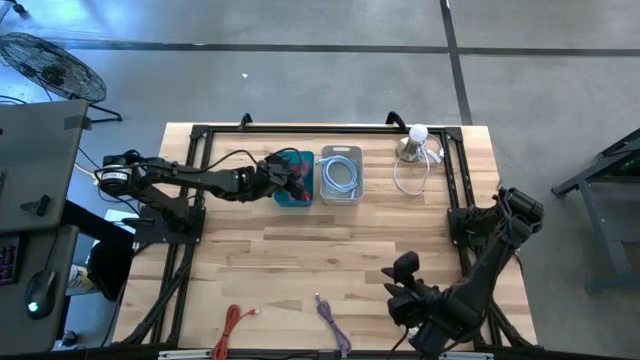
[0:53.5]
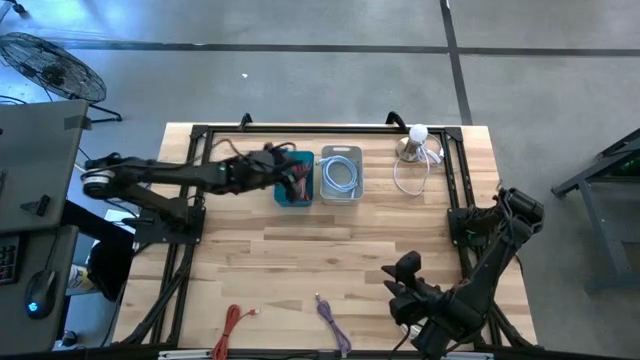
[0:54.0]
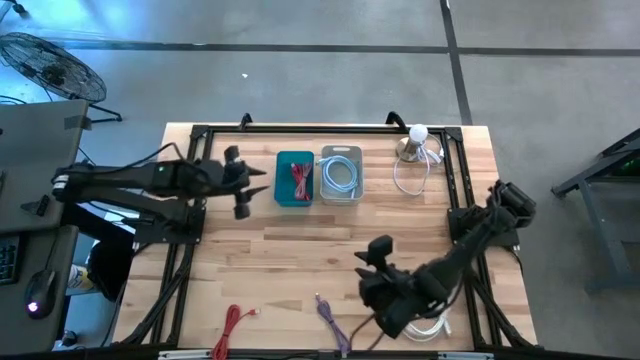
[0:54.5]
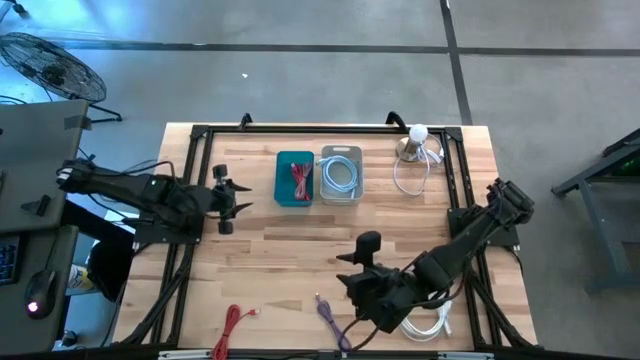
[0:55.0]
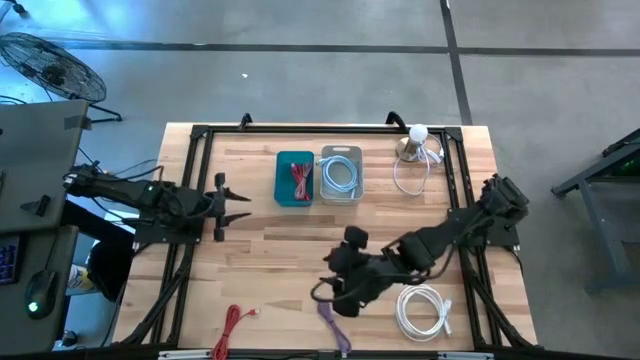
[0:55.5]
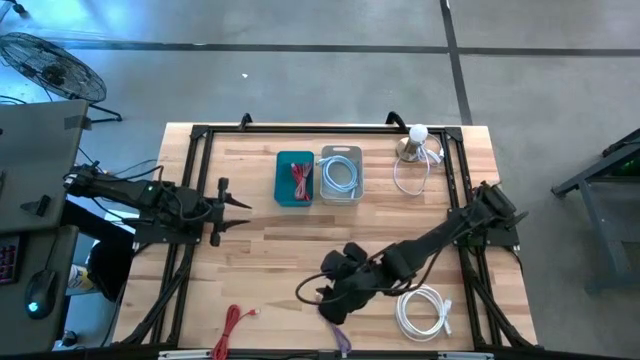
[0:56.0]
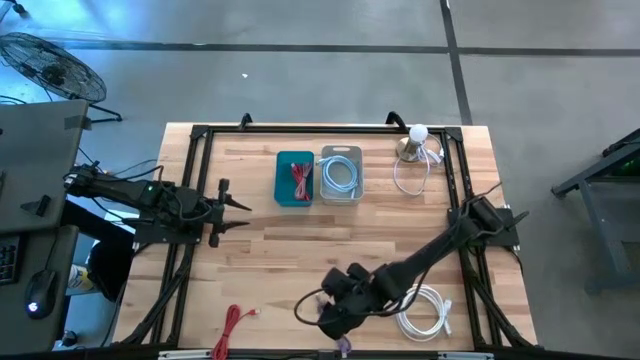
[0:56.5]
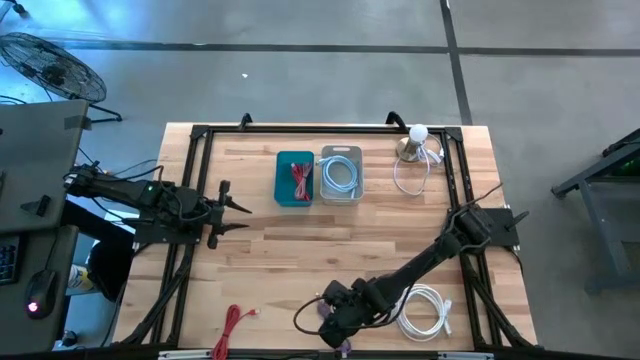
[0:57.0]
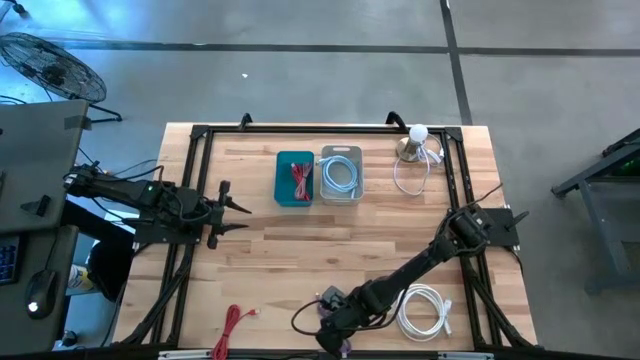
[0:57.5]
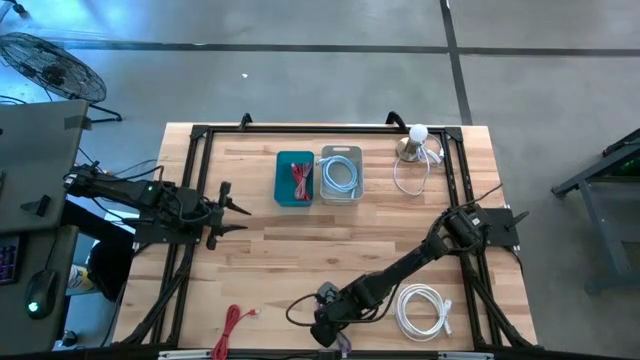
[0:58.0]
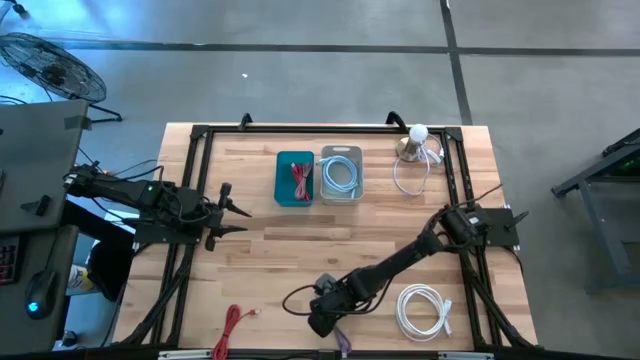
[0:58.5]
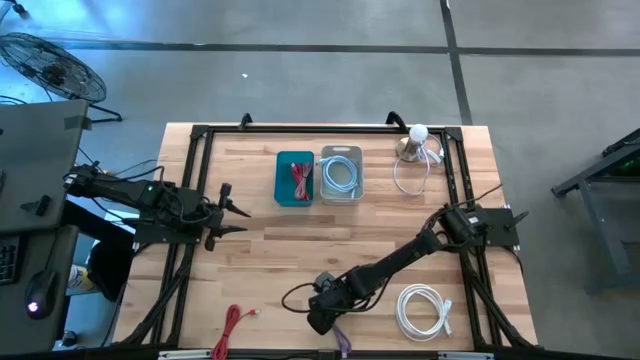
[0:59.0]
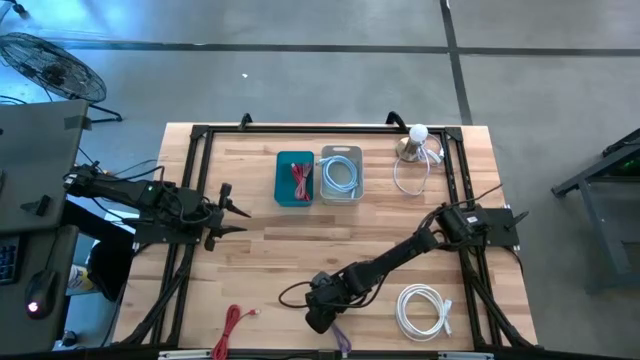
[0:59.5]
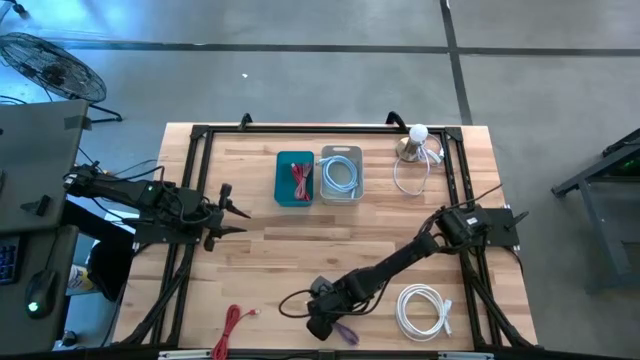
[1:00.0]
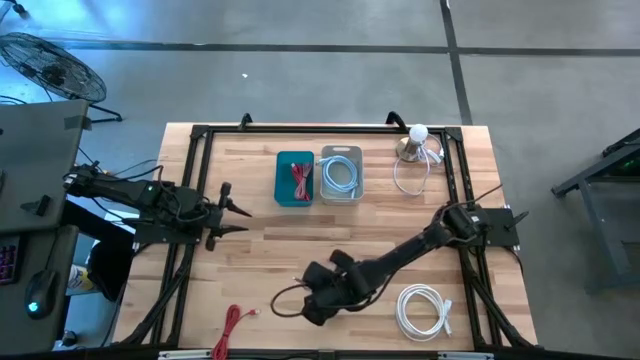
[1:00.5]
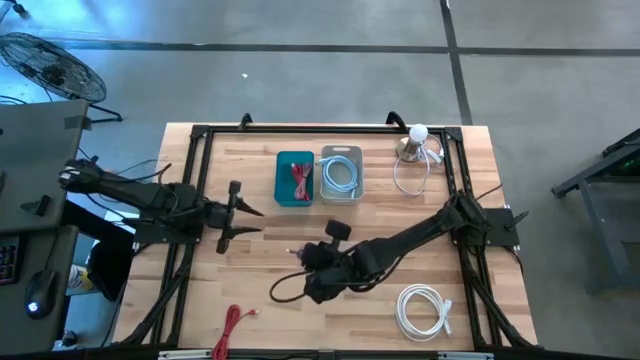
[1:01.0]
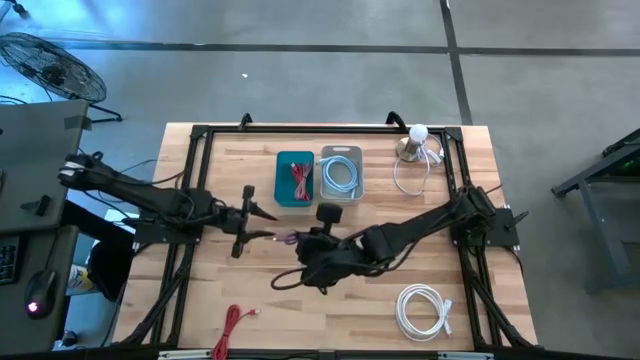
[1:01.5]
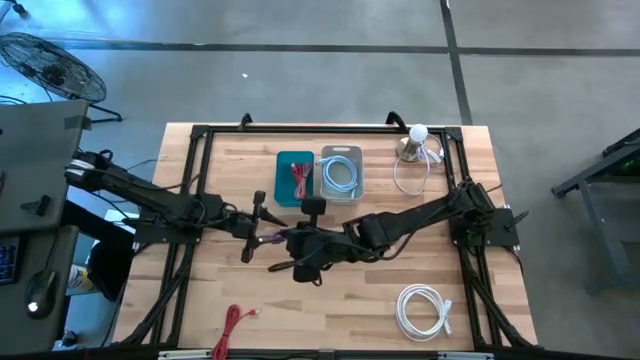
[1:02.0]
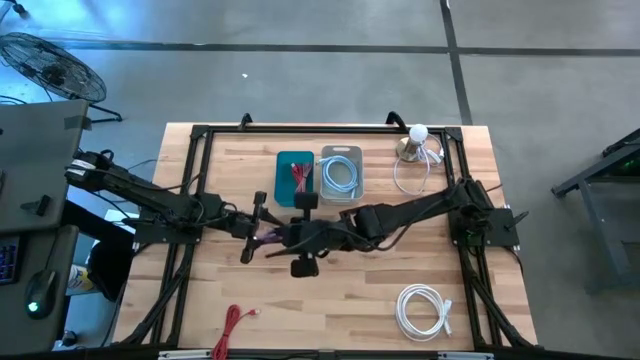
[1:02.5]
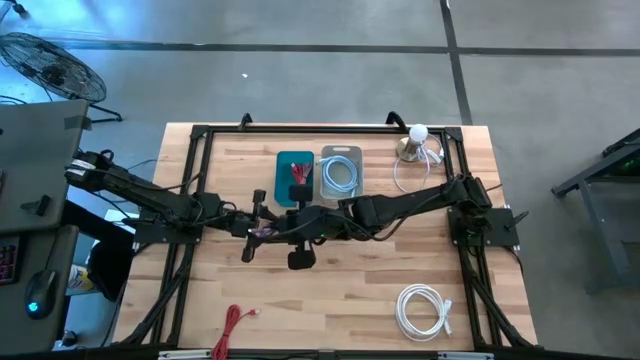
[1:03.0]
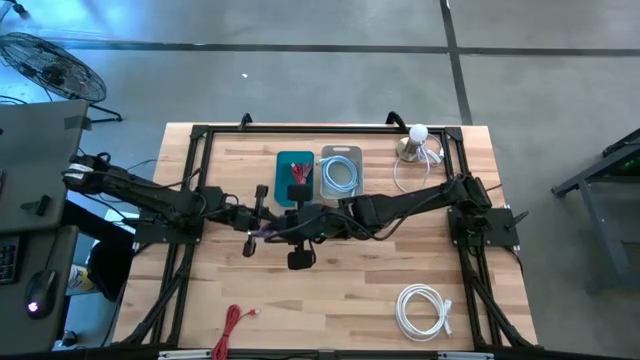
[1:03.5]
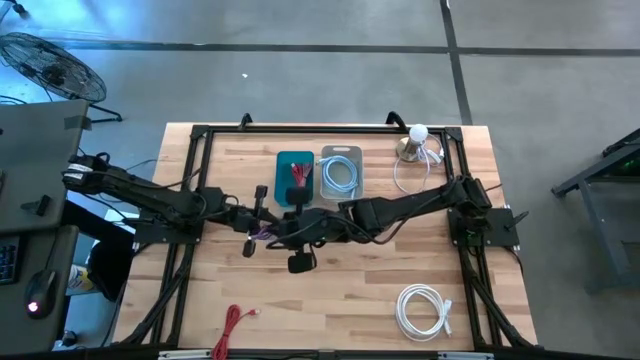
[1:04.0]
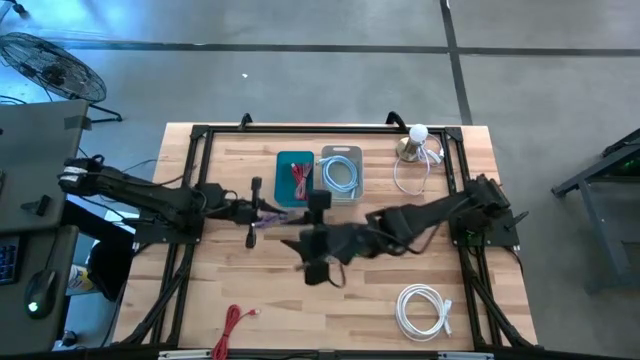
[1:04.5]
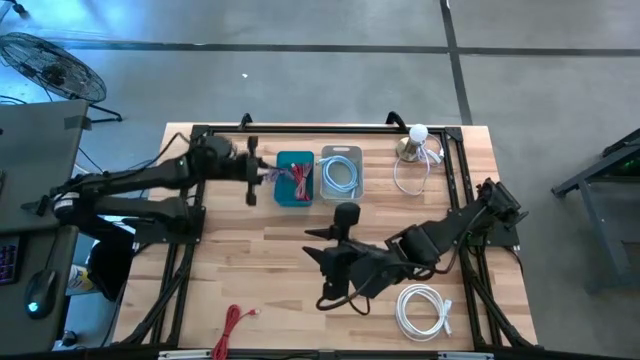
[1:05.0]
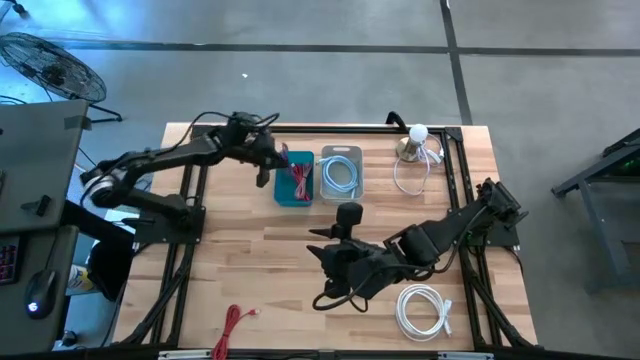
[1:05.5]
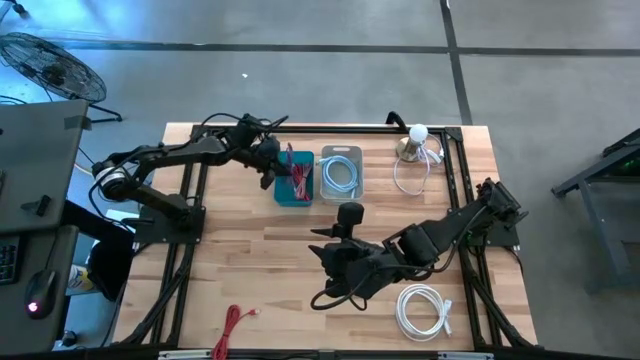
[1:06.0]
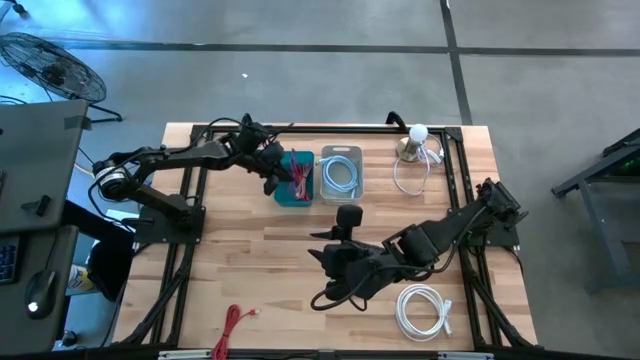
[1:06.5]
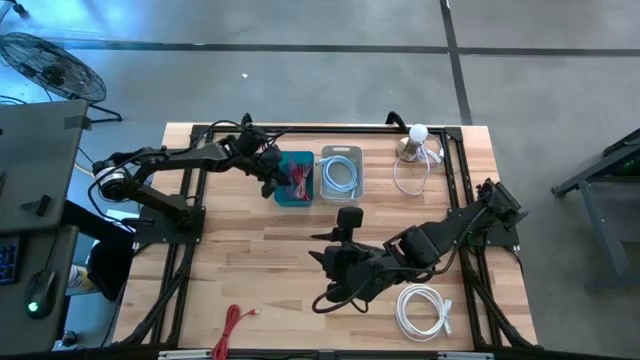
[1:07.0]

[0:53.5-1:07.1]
Task: Pick & Place USB Port
Put the violet charger cable into the blue bin

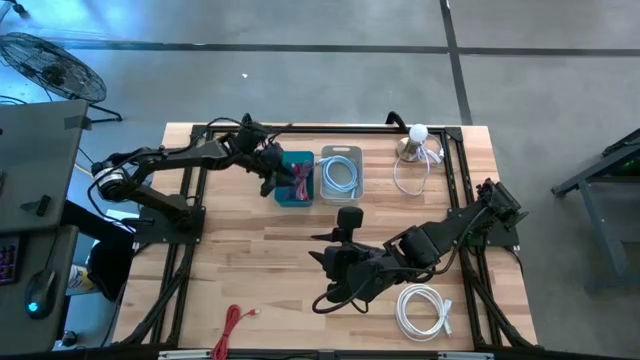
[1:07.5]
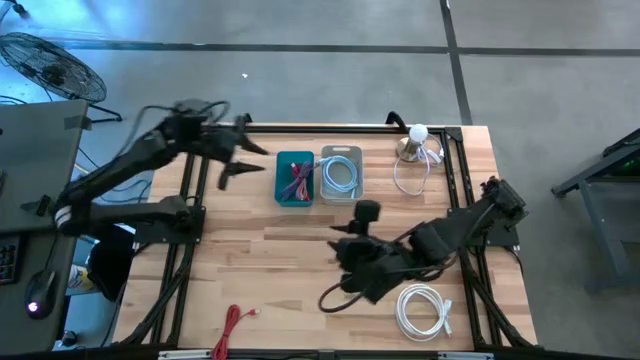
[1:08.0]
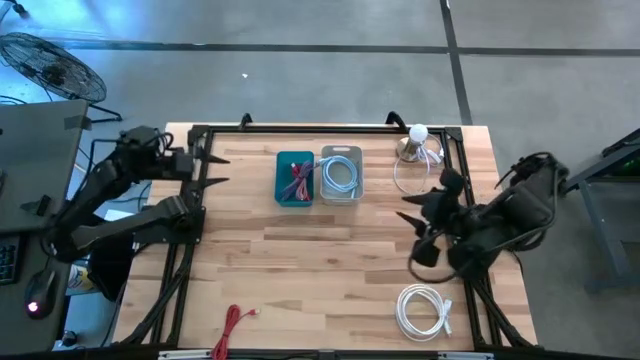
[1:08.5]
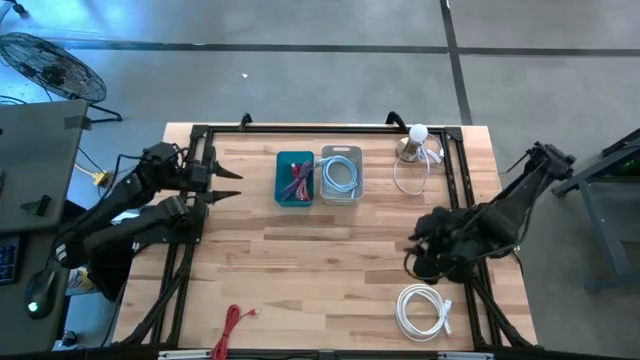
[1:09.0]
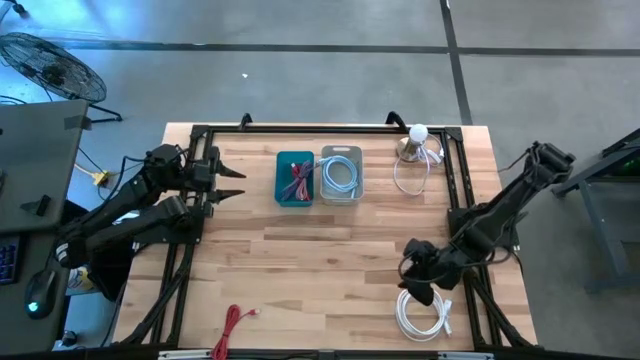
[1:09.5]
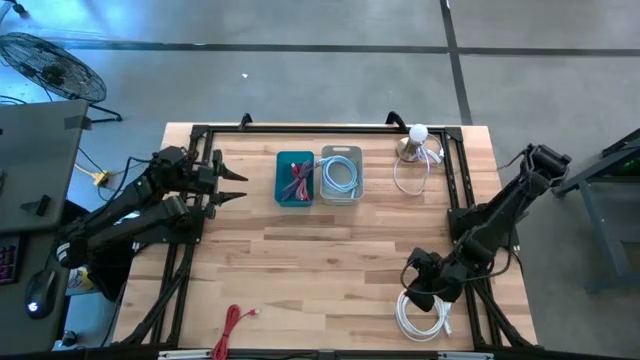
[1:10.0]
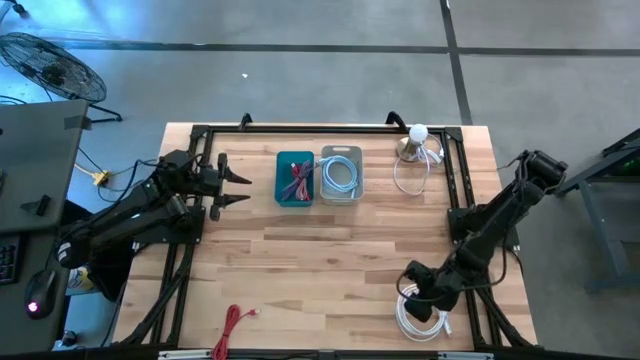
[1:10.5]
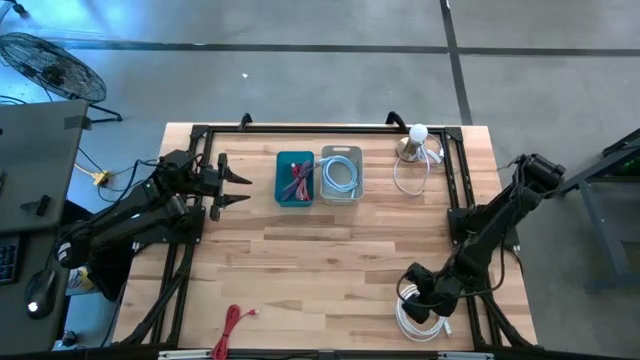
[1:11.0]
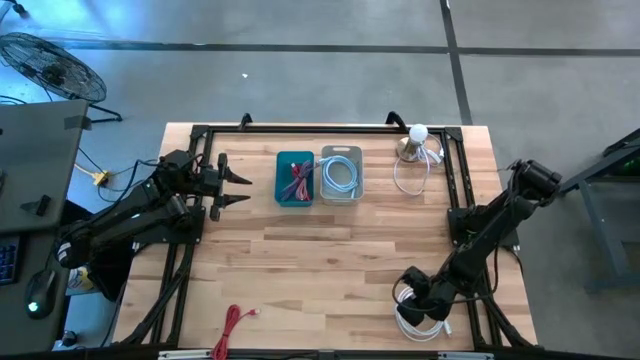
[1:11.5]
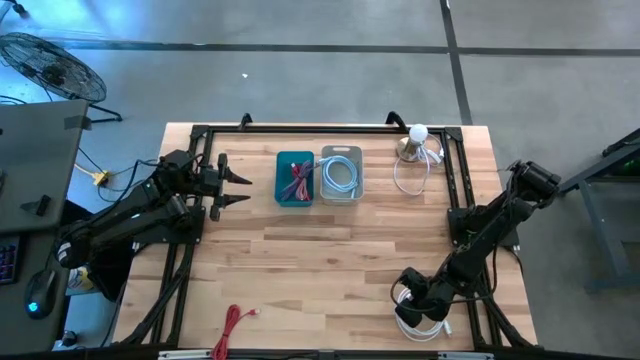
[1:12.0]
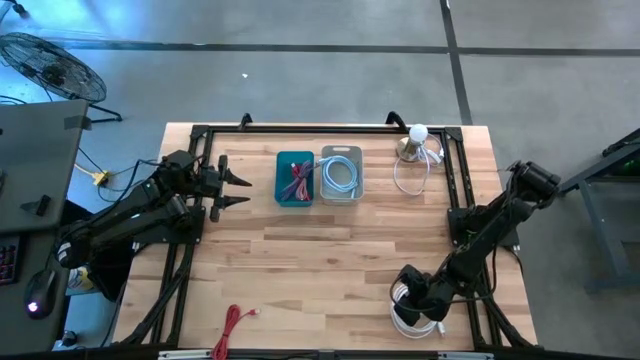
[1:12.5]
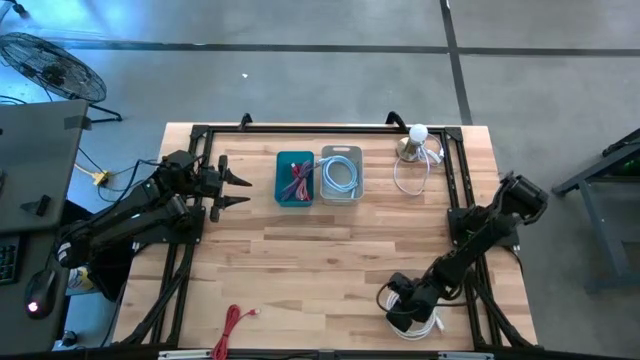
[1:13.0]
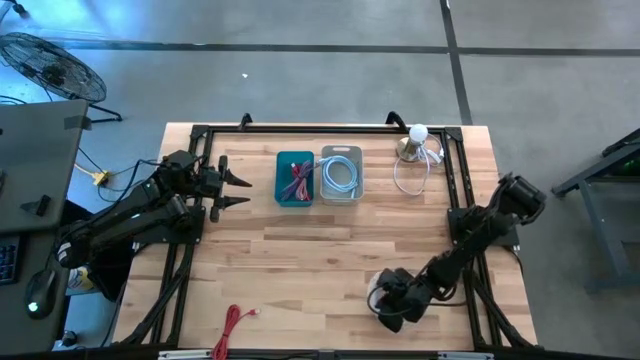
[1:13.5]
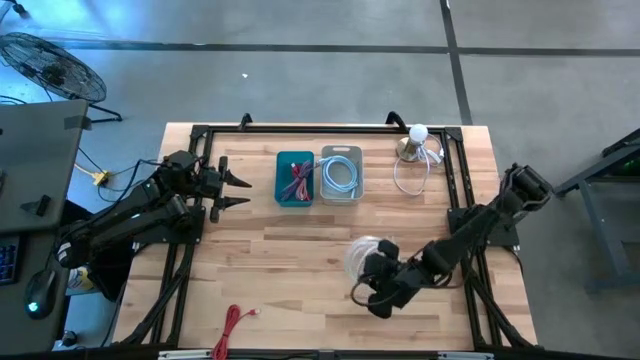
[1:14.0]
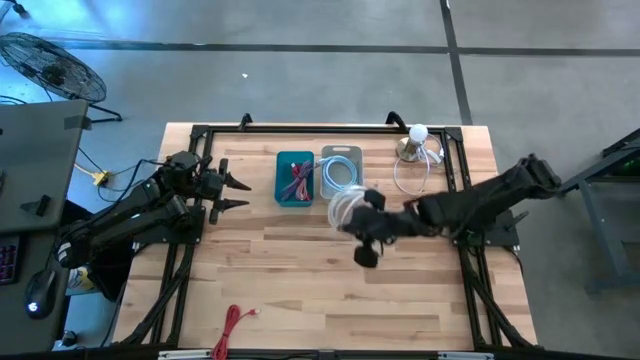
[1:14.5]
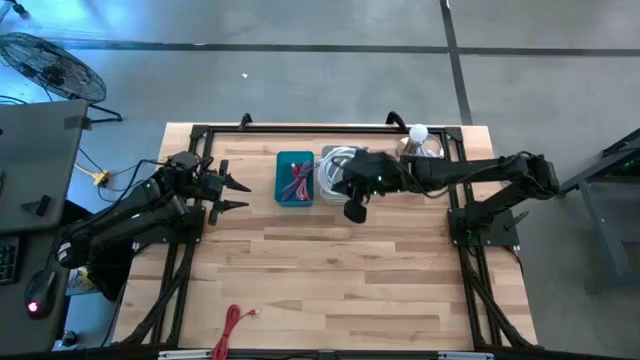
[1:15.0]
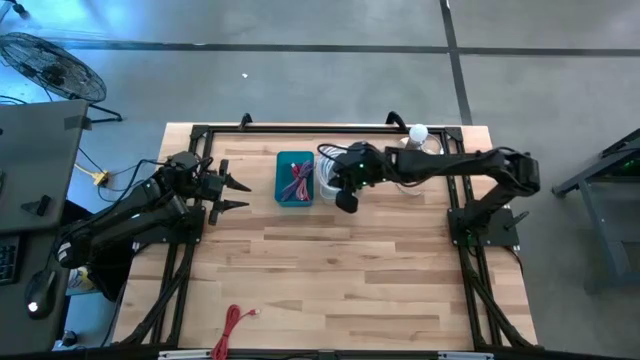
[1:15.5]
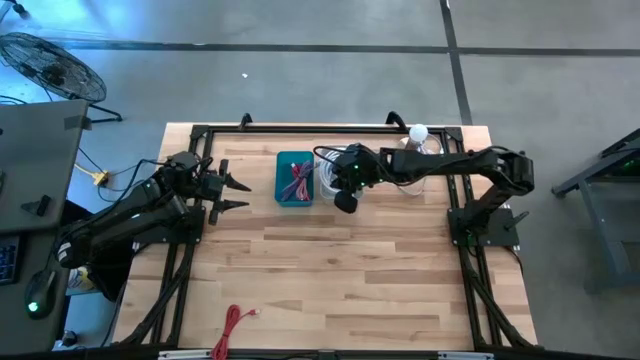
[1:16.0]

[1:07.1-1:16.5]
Put the white HDMI into the white bin
